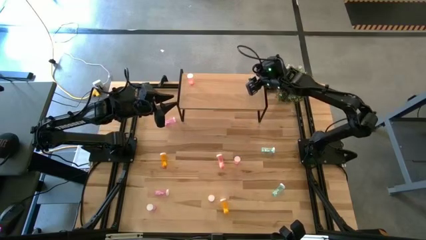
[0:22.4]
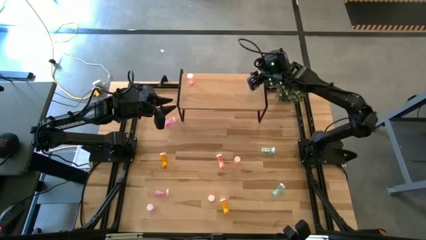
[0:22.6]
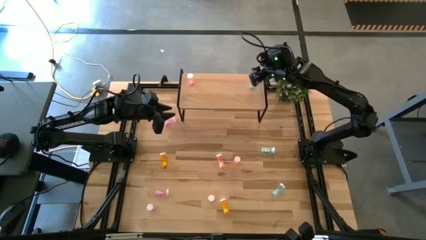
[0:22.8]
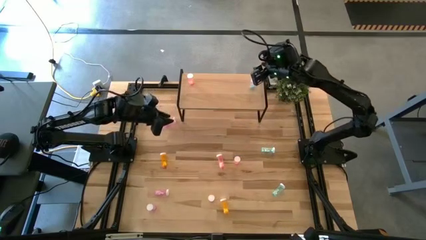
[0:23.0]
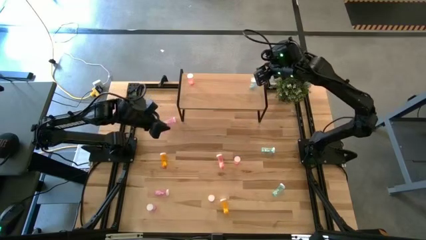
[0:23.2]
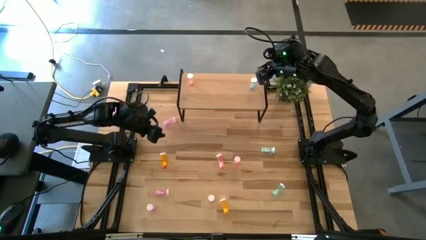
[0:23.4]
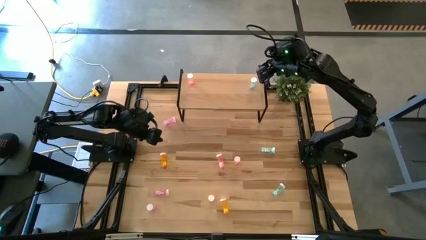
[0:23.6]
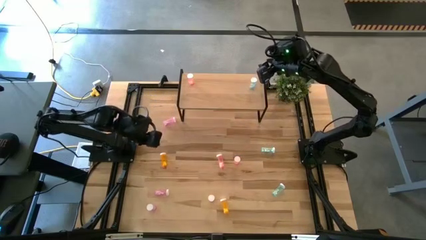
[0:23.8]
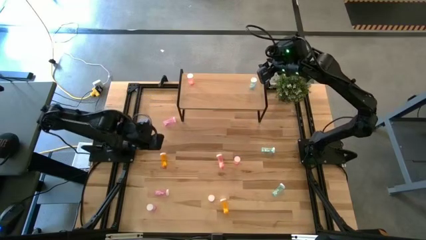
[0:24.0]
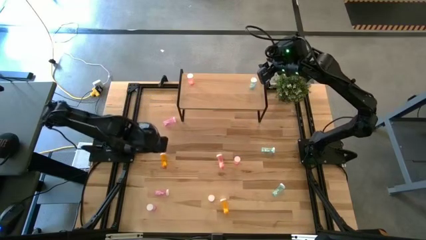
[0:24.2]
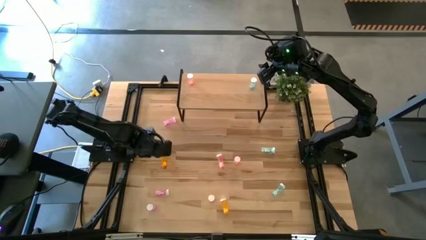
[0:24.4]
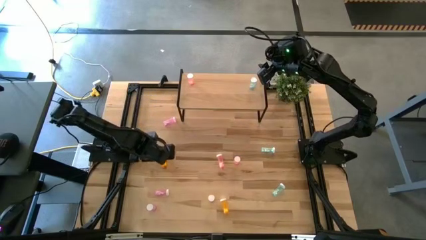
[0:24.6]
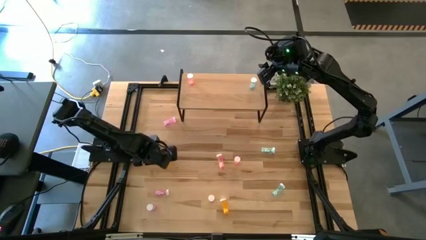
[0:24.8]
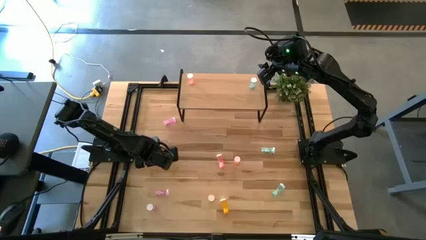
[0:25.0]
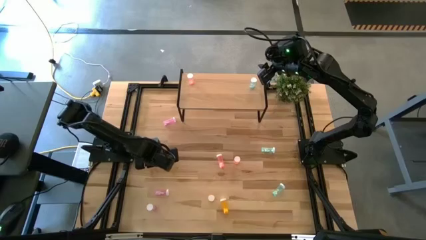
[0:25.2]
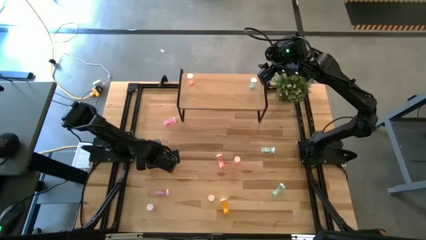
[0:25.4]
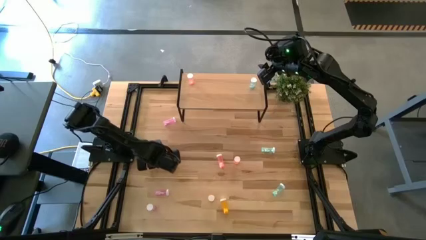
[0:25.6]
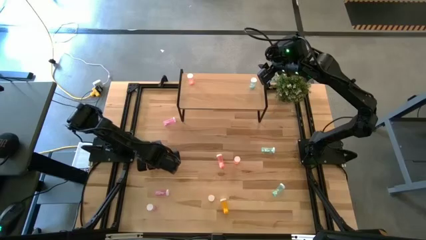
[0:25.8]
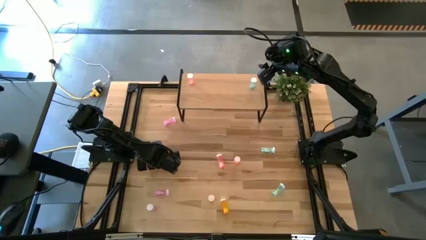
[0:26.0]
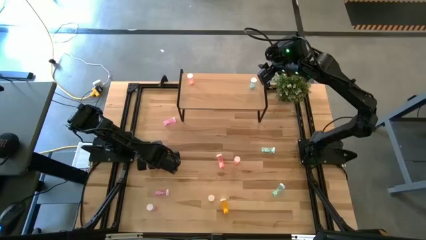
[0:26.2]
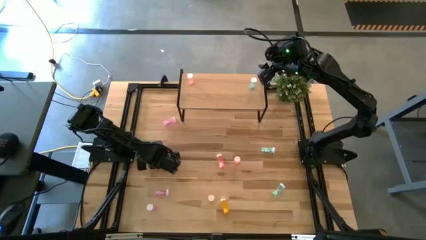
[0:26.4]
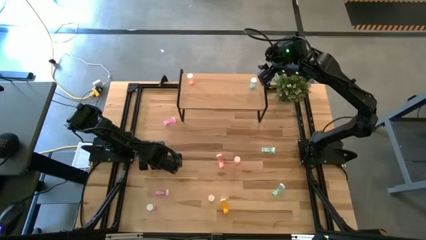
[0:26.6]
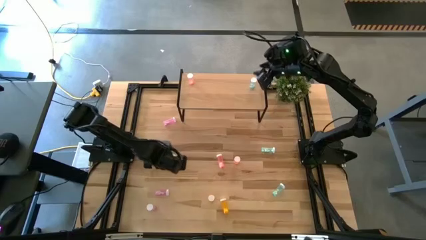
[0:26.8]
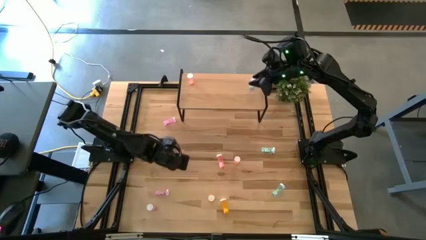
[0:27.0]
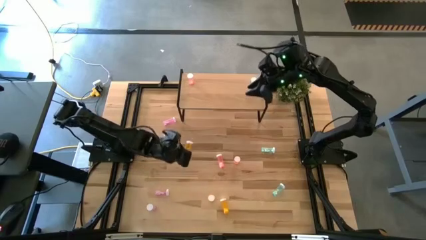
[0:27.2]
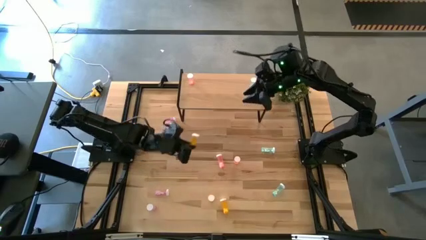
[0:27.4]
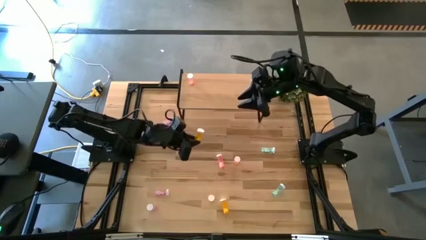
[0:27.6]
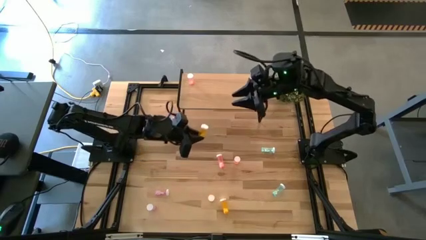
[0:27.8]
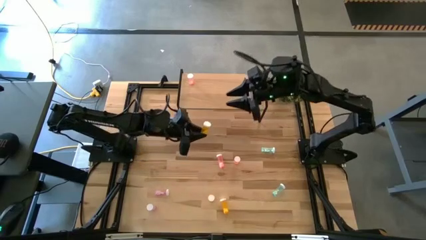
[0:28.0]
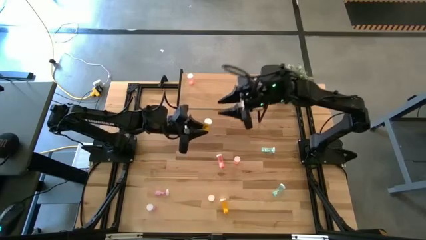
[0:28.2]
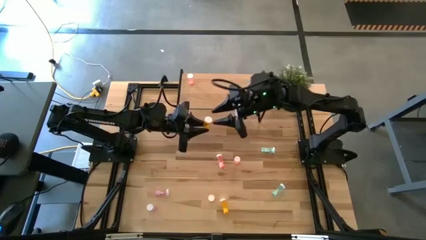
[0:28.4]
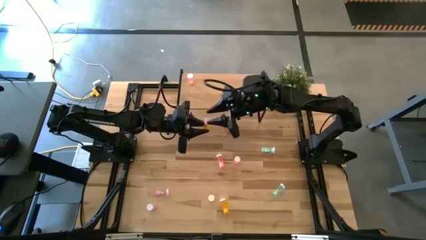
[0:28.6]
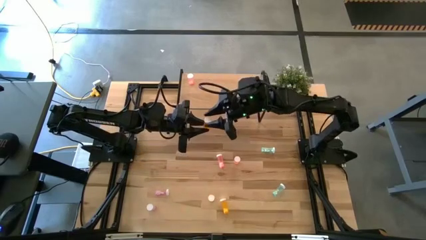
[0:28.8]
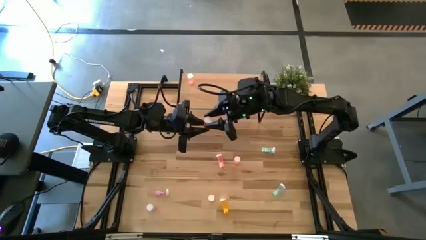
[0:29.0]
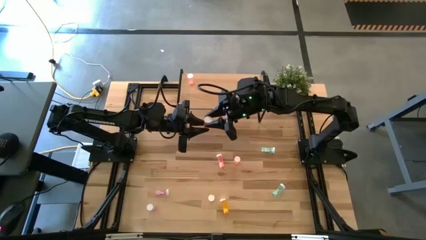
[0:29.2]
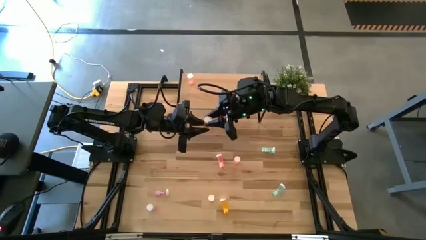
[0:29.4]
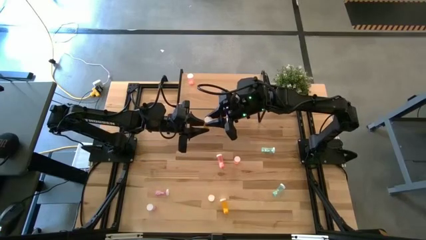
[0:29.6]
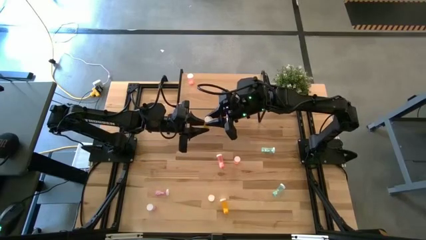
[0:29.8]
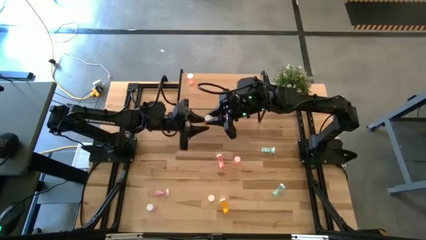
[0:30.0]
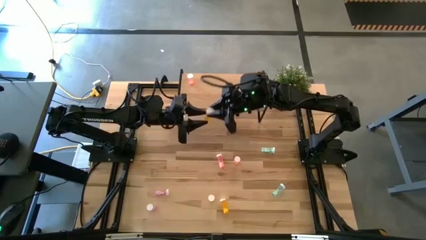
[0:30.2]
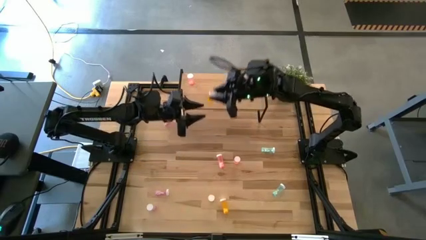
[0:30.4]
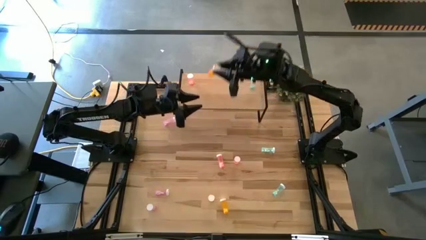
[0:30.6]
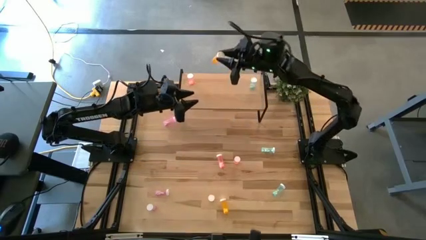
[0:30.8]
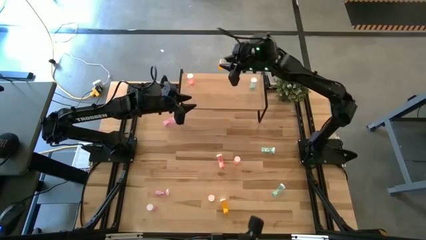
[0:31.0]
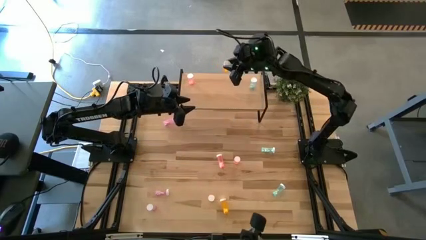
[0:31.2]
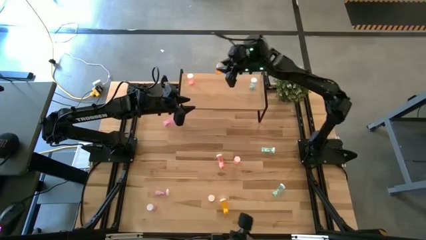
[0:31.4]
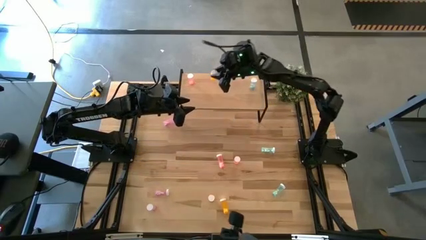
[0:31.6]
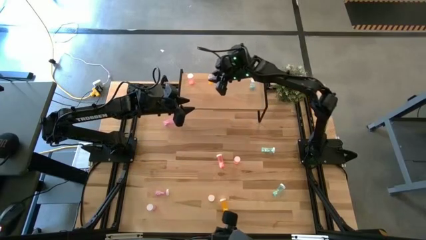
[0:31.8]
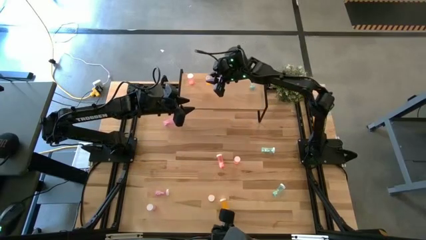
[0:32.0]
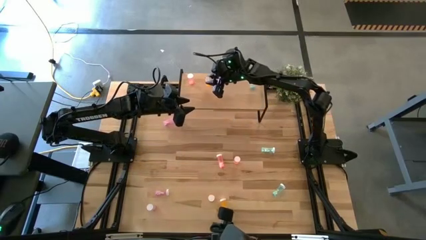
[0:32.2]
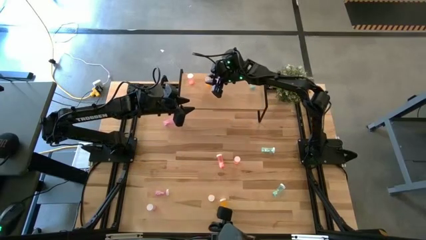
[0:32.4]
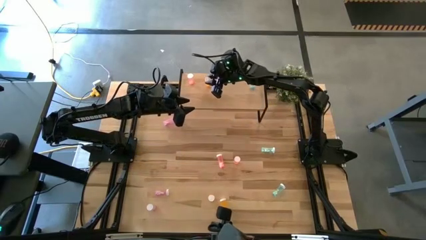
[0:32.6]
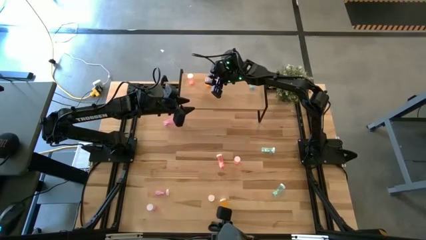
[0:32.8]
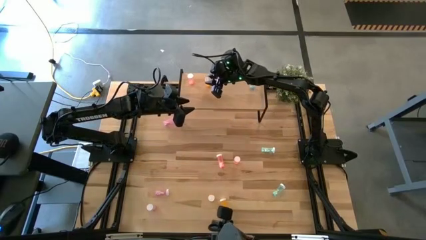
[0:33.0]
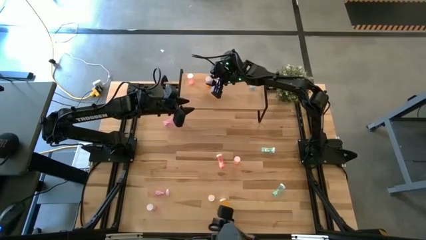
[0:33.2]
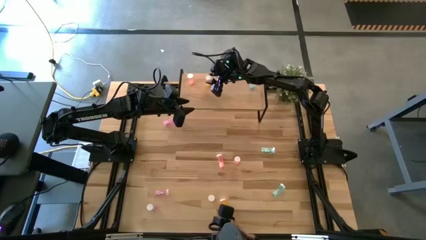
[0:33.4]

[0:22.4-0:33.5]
Task: Pick and place medicine bottles onto shelf by color
Put the top orange pill bottle on the shelf

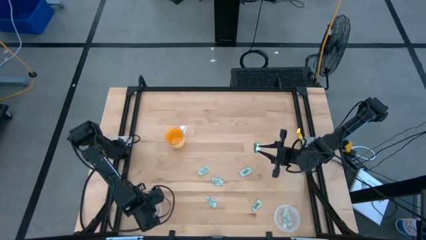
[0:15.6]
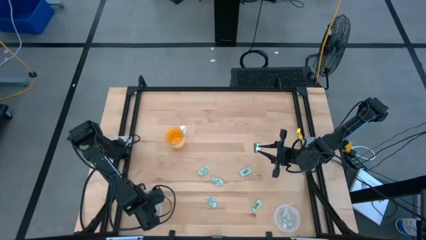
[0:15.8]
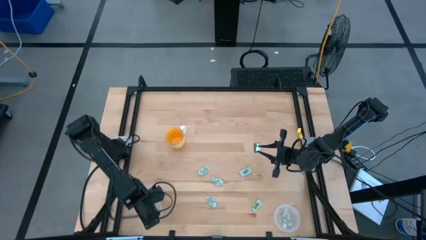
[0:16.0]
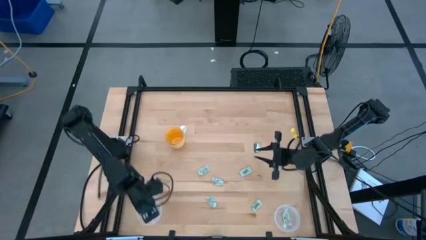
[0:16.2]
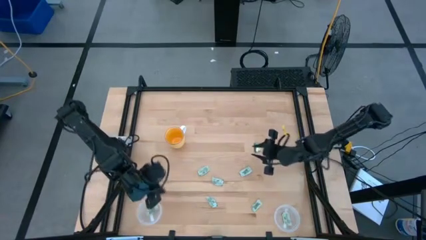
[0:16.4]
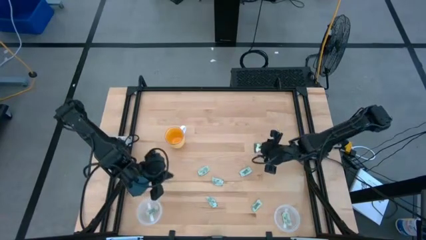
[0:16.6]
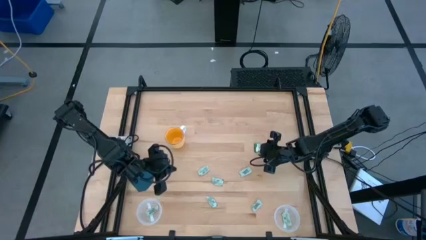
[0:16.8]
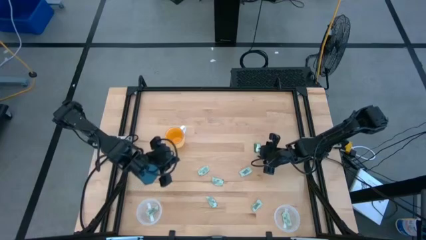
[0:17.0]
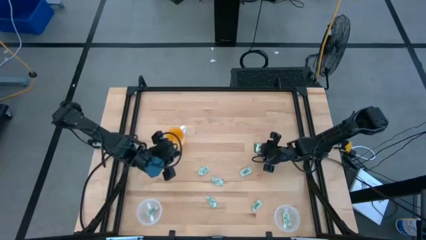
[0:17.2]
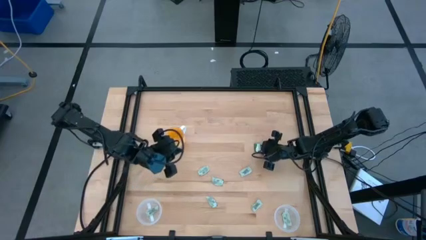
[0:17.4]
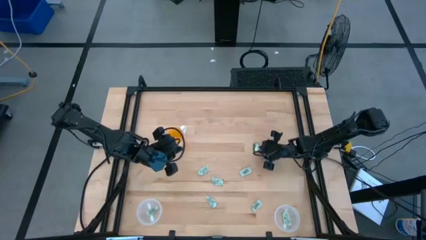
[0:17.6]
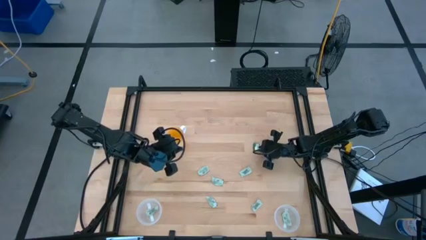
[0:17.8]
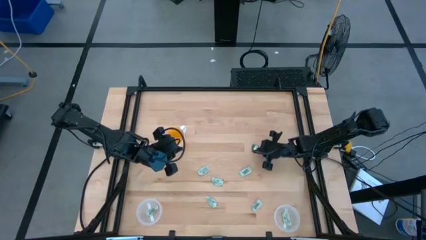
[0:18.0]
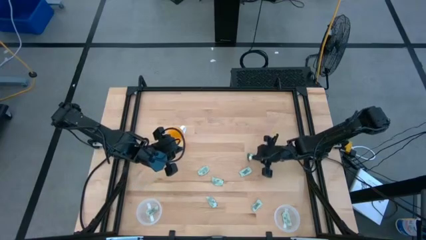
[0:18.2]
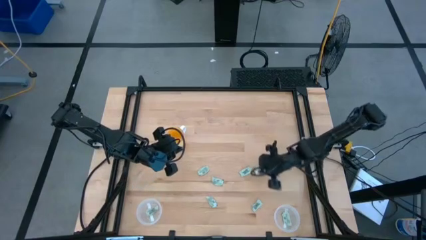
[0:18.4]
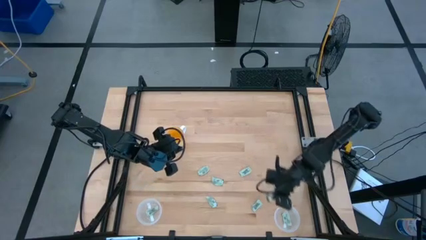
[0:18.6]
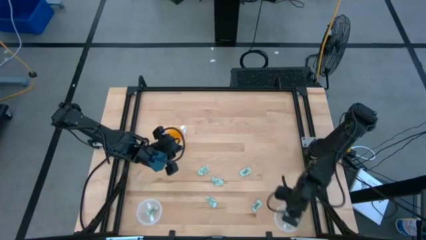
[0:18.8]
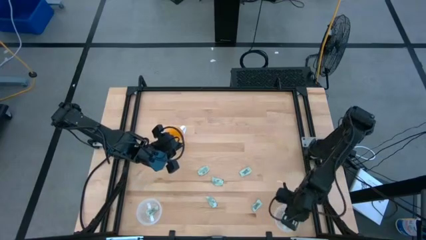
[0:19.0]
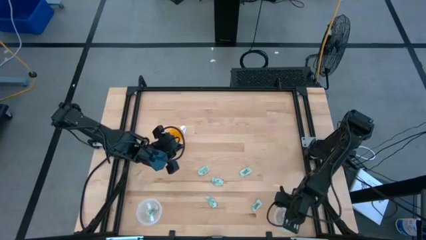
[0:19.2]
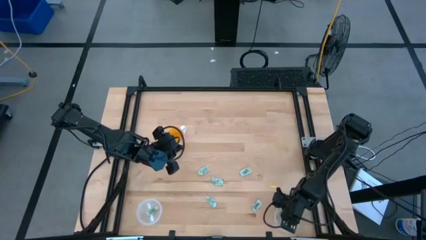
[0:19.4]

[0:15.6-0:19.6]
Task: Pick and place items into bin
Put the truvia packet into the right transparent bin

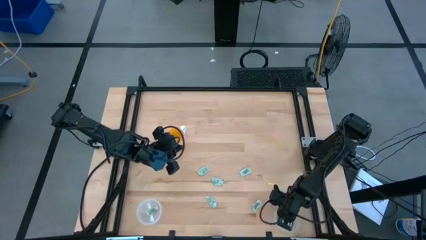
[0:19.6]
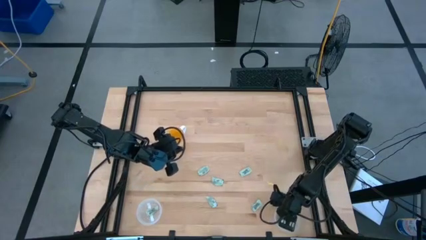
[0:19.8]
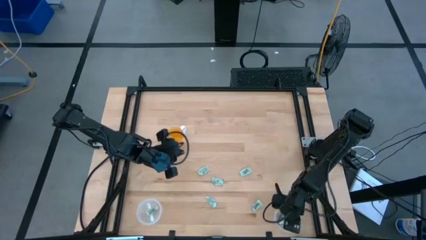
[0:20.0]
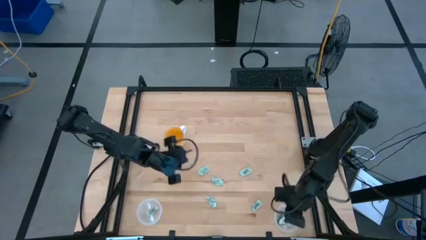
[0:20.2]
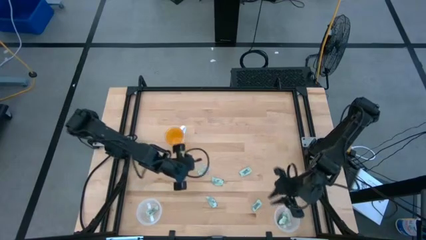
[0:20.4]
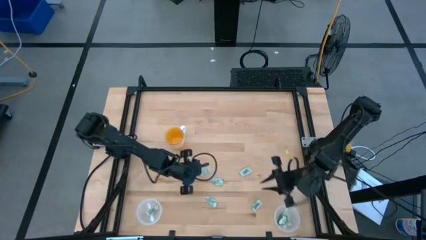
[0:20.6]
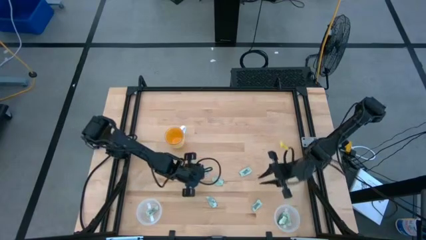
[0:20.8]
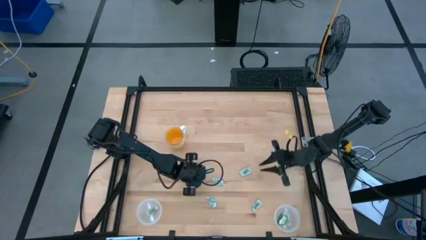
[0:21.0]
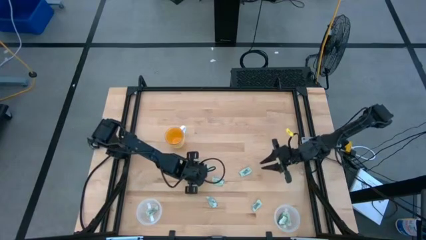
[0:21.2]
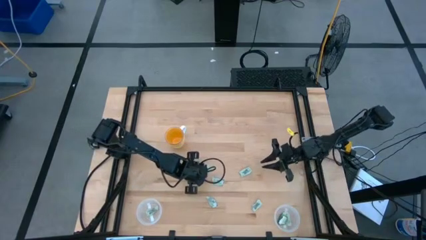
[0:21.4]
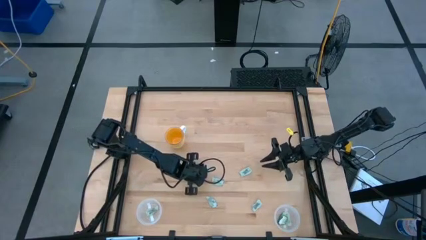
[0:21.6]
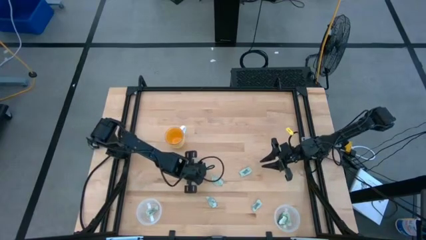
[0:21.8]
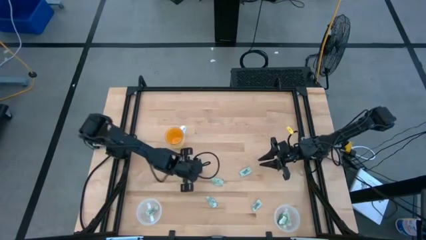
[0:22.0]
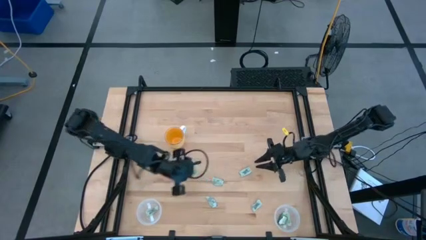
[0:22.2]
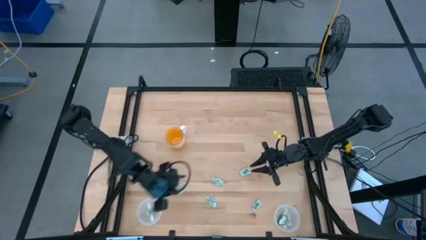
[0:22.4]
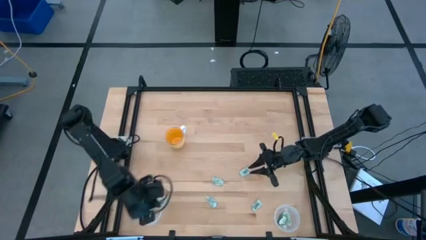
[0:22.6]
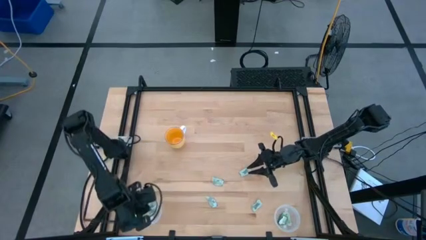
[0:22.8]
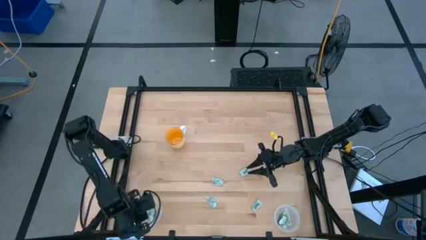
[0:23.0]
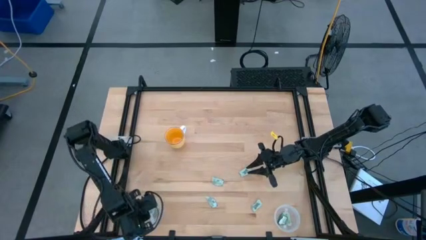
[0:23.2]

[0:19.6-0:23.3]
Put the stevia packet into the left transparent bin
